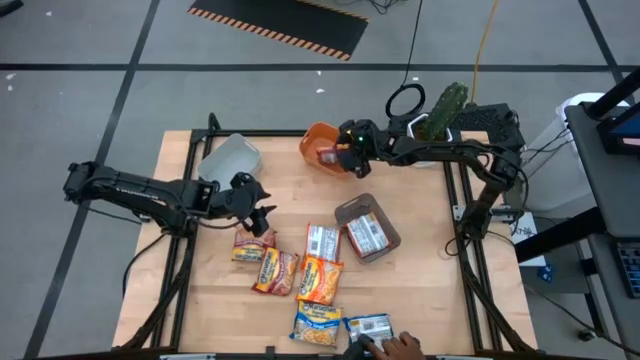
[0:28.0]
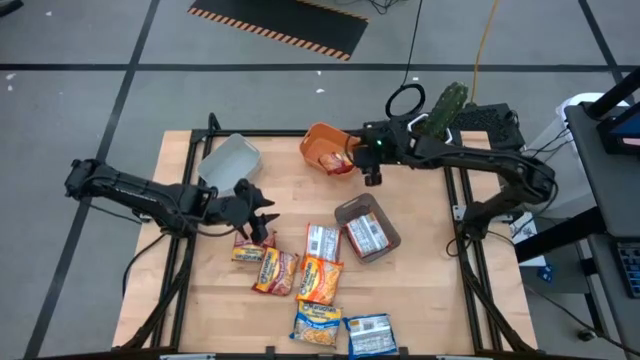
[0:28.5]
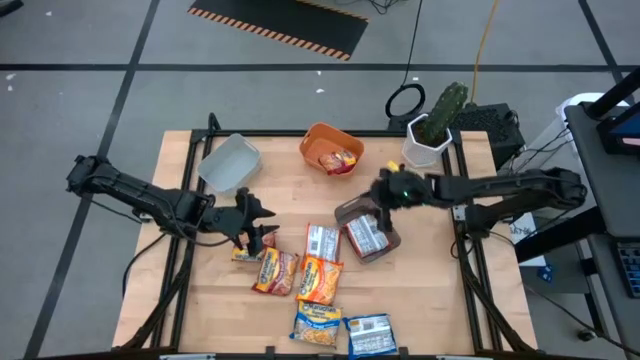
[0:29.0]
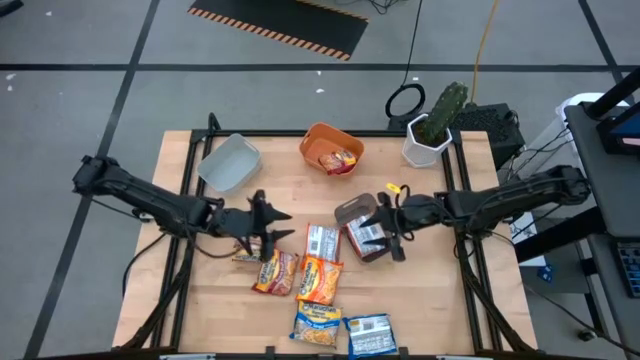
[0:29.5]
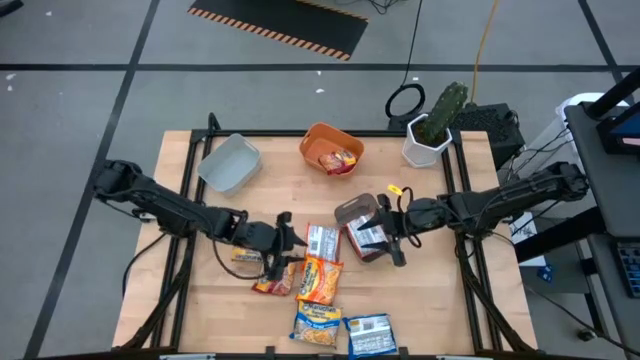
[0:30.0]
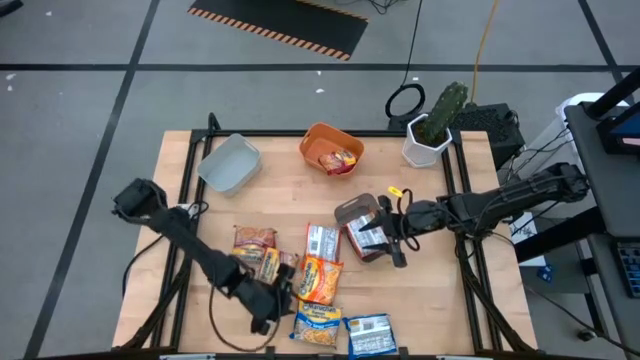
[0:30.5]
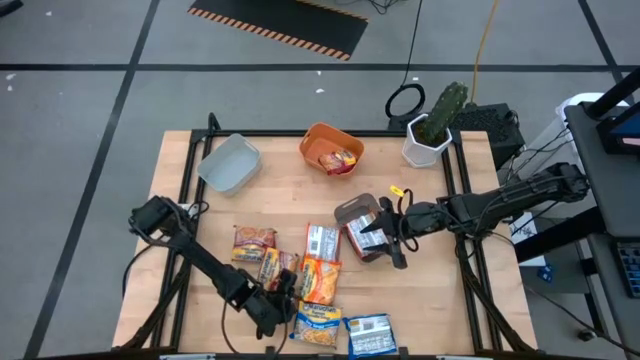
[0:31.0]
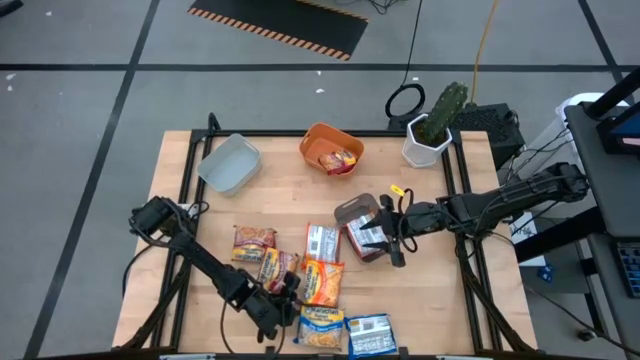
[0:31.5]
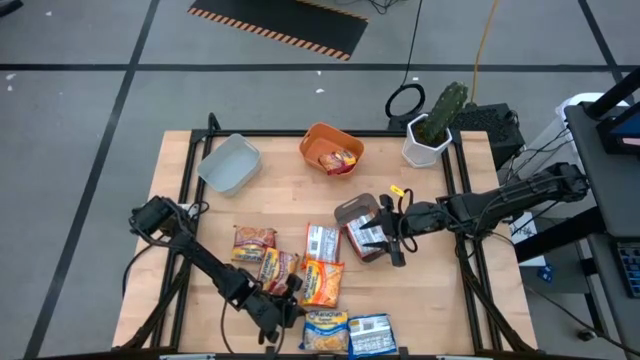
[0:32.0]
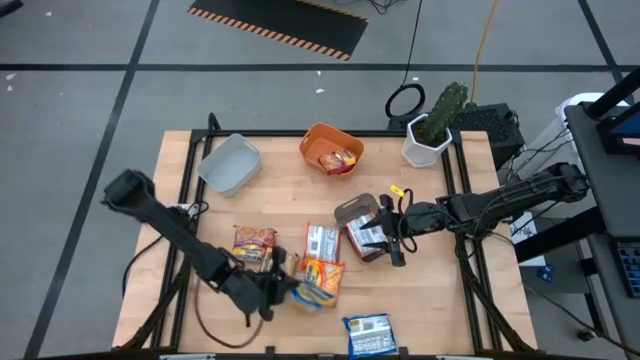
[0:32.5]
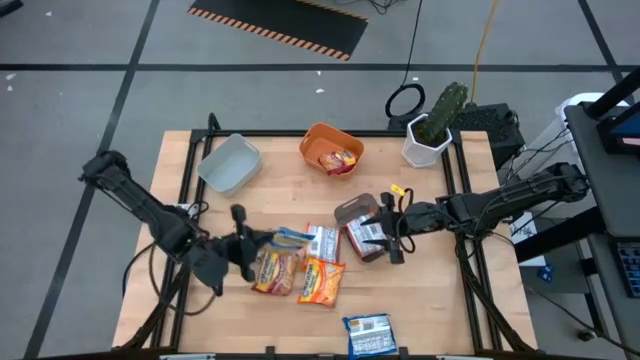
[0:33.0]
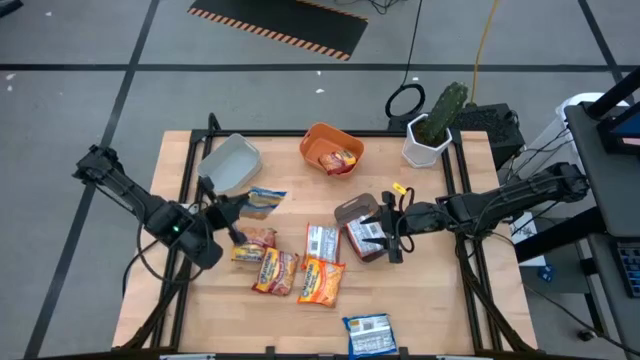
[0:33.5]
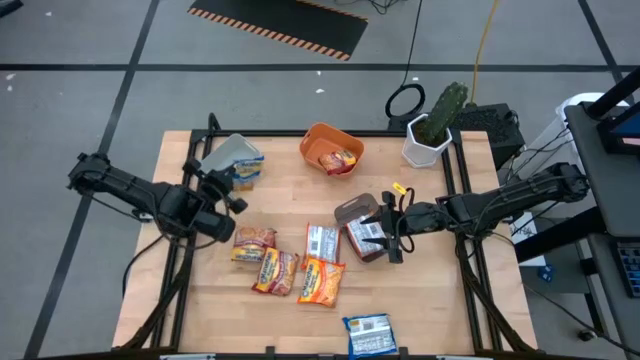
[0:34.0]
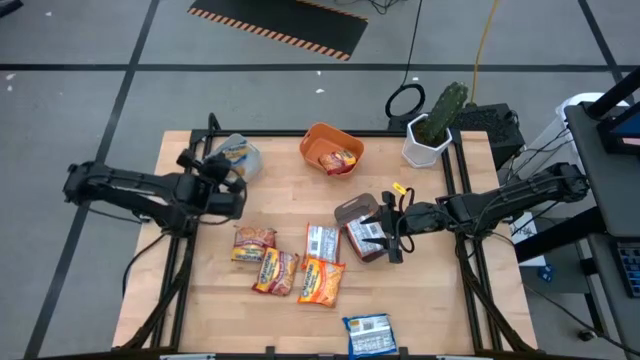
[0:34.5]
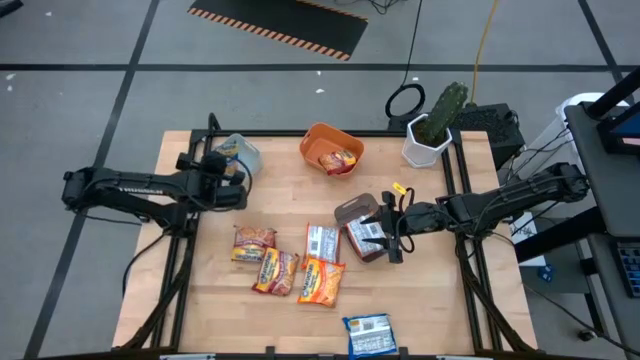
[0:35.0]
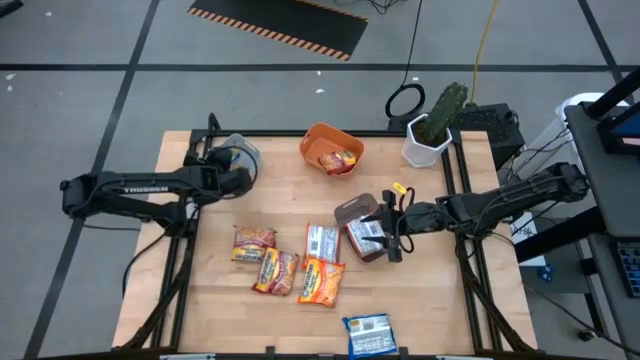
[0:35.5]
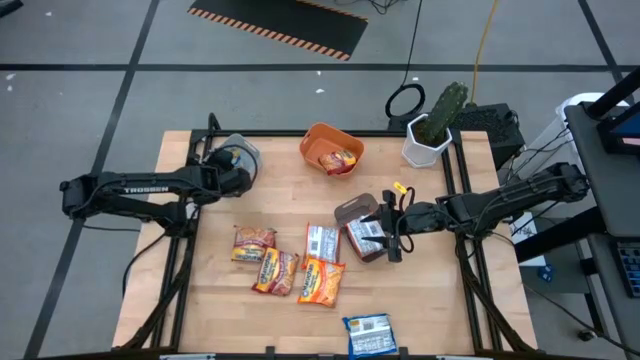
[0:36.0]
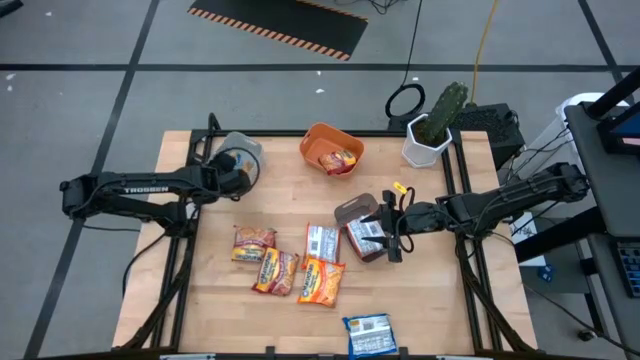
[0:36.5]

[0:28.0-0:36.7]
Task: Sort Maruchan noodles
Put the left blue noodle pack into the gray bin

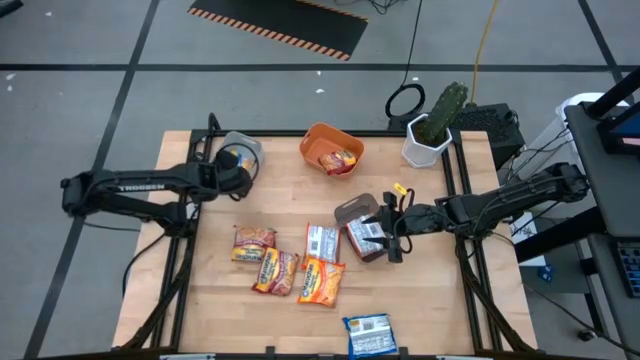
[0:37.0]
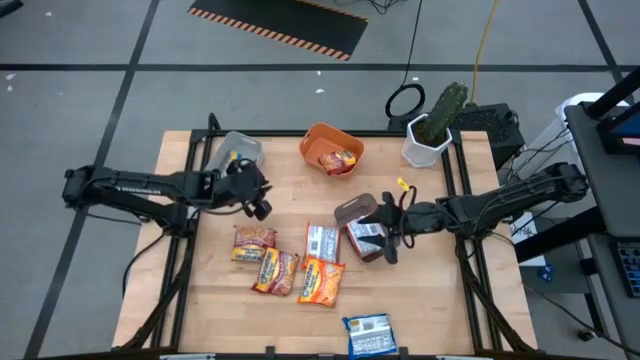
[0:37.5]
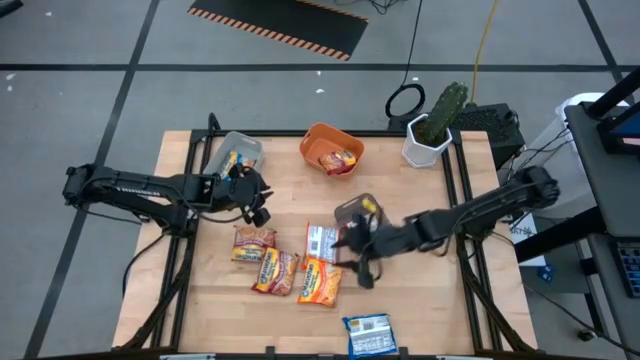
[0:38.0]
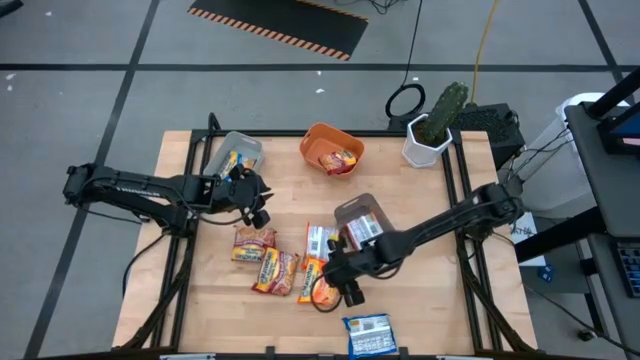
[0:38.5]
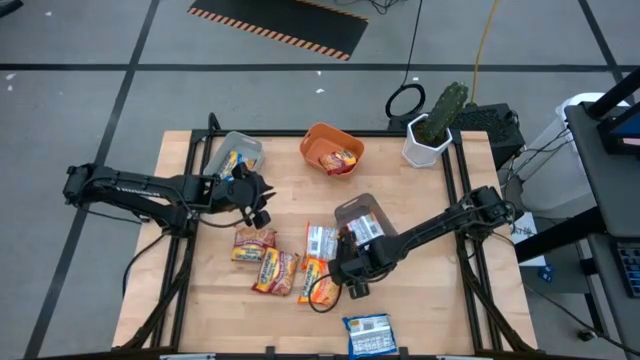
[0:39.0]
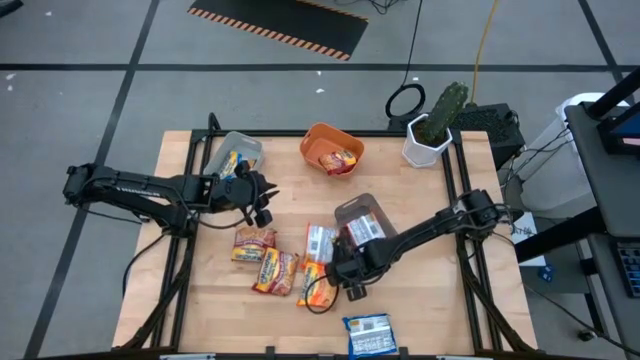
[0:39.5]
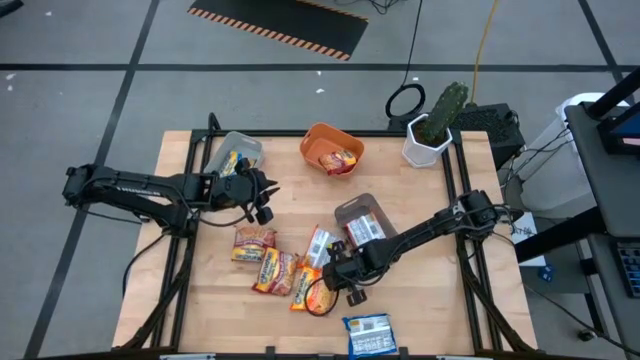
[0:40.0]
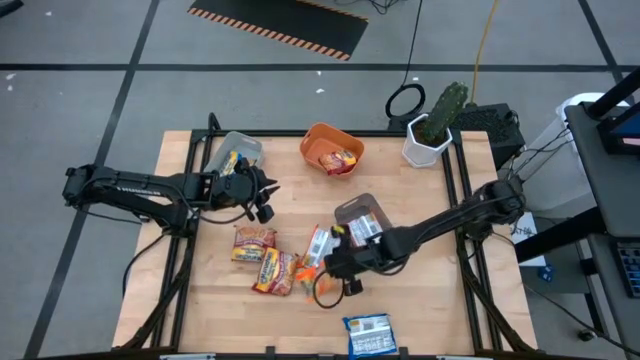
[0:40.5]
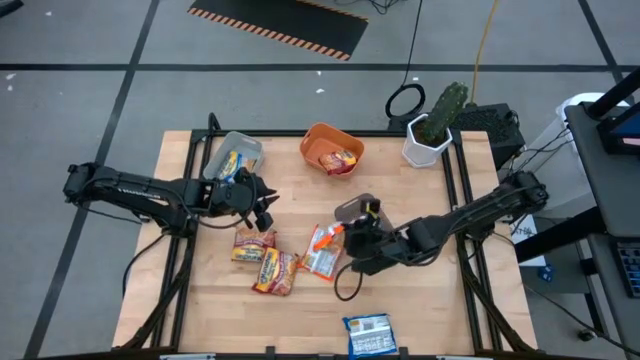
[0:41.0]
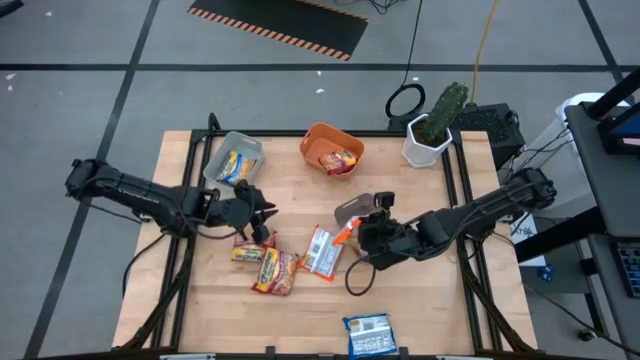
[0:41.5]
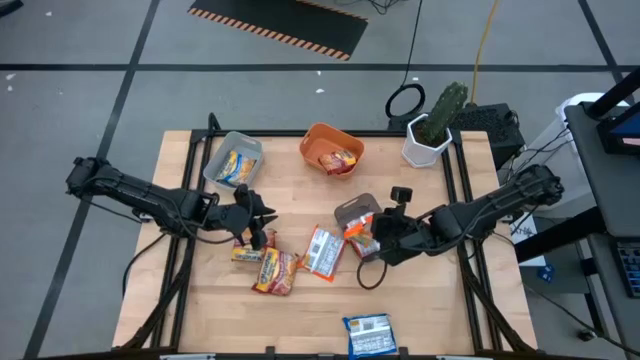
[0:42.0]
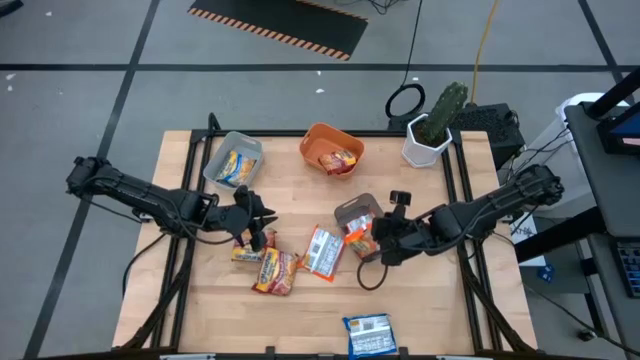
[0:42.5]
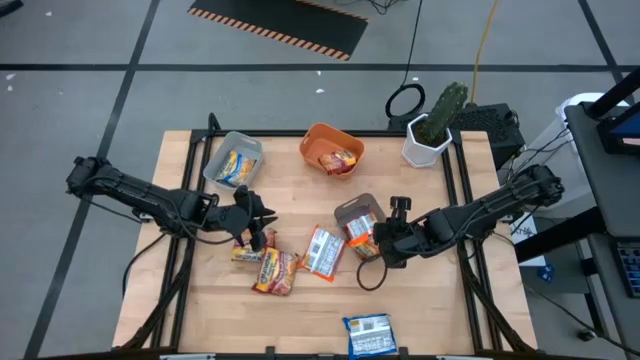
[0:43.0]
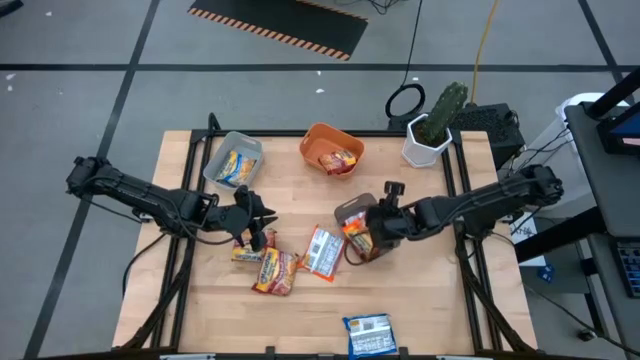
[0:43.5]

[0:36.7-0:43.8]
Put the bottom orange noodle pack into the black bin

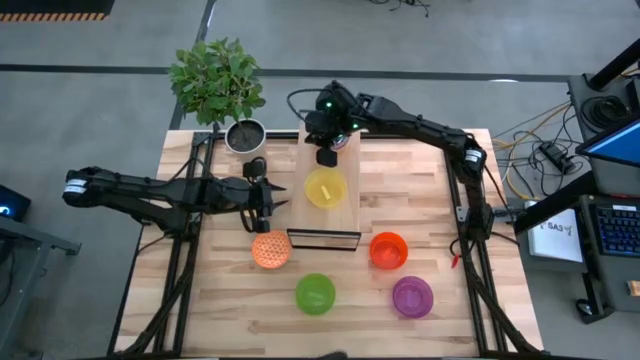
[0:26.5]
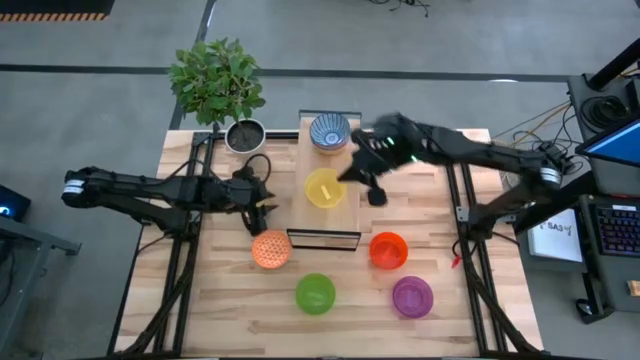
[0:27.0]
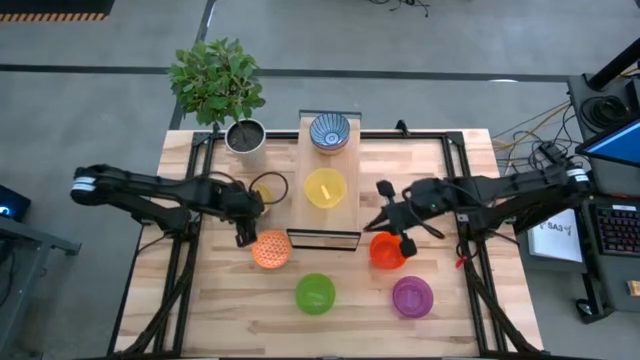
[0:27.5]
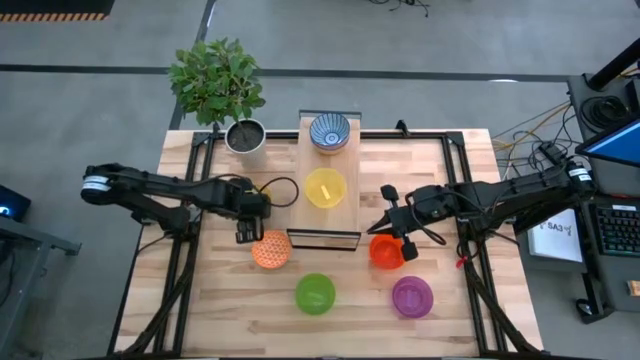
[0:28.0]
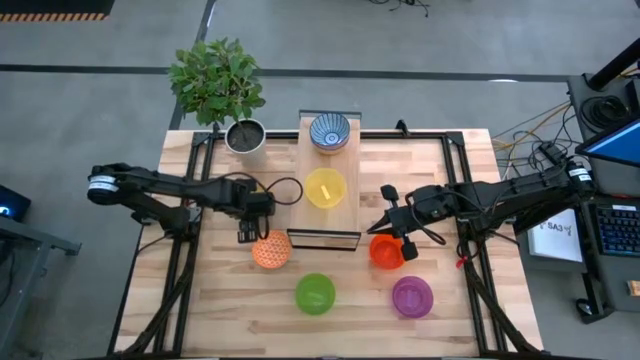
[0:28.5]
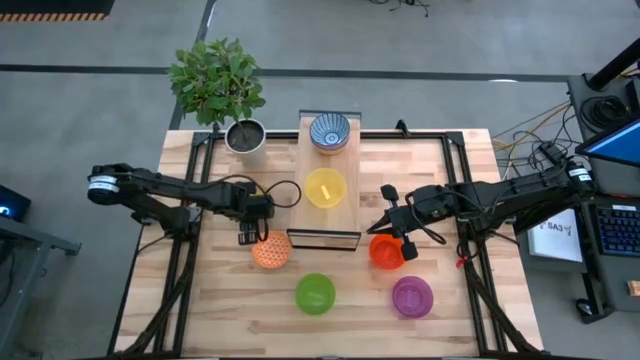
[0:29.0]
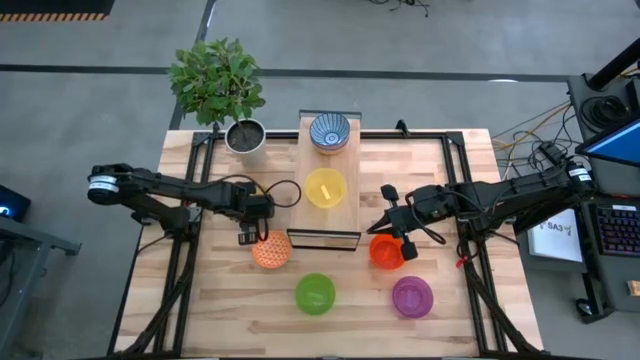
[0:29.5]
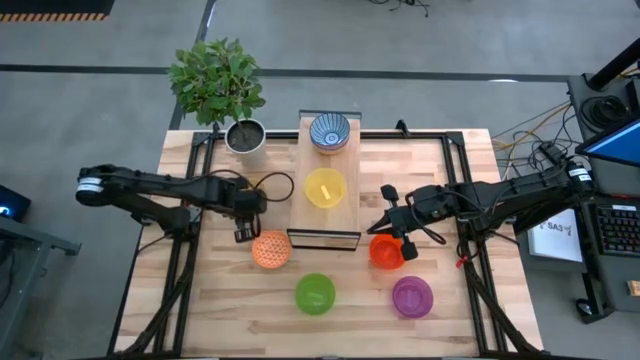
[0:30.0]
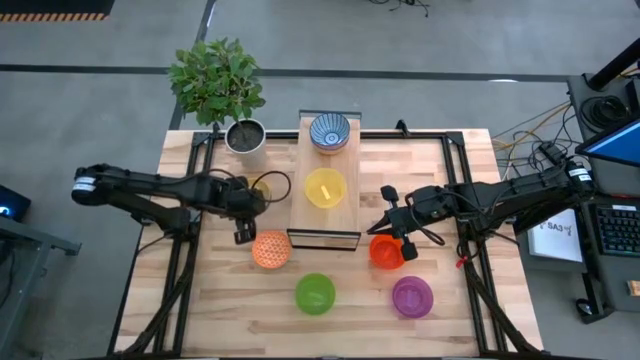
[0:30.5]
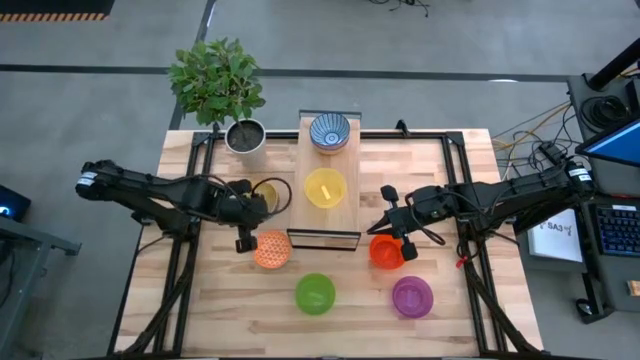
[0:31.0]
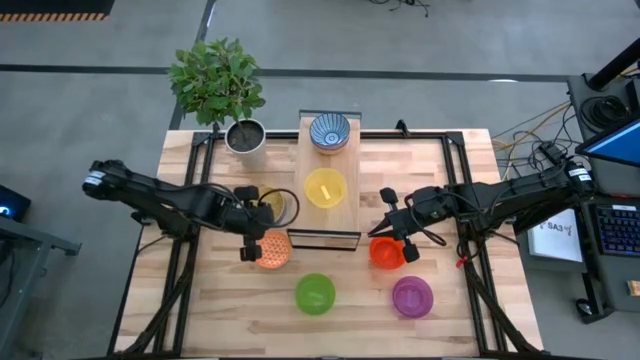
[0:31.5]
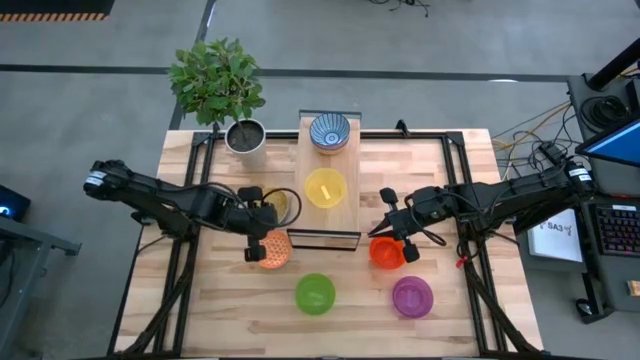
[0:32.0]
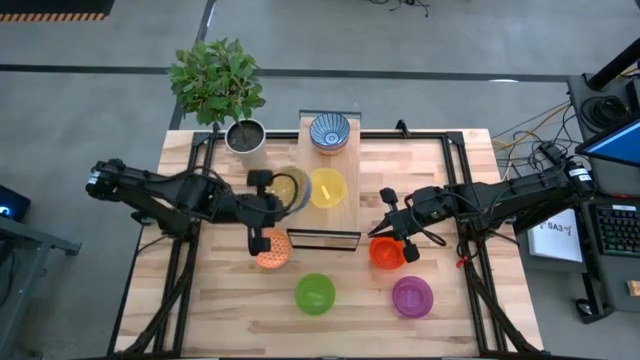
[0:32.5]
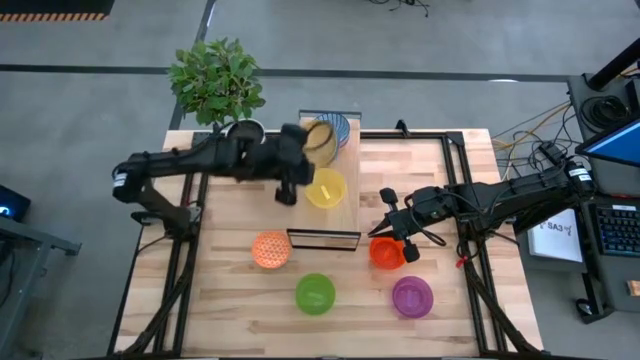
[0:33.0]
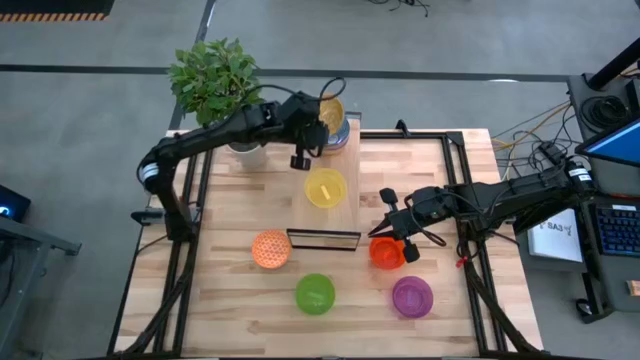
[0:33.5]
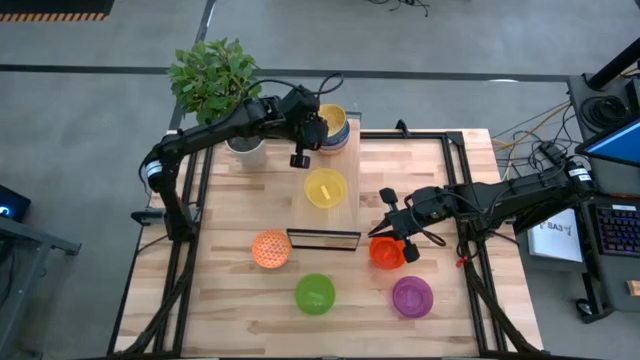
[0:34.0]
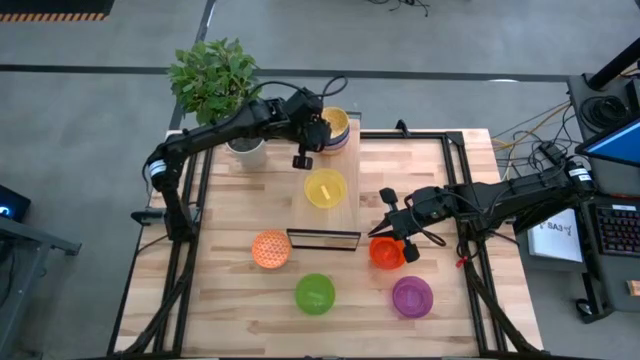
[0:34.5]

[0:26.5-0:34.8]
Task: Place and stack bowls onto a shelf
Stack the yellow patterned bowl on top of the blue patterned bowl on the shelf
